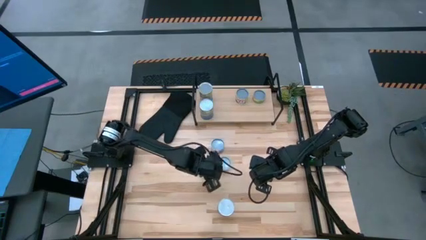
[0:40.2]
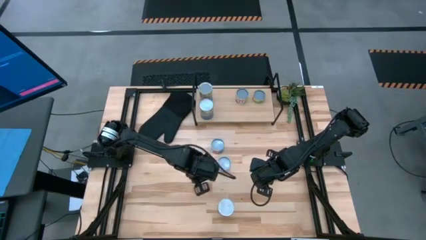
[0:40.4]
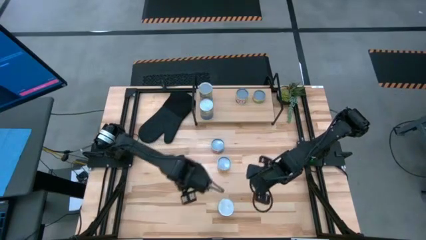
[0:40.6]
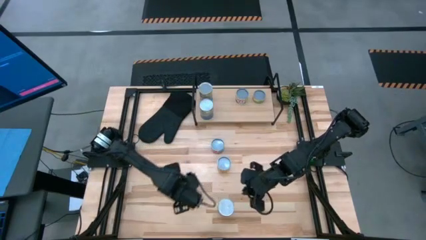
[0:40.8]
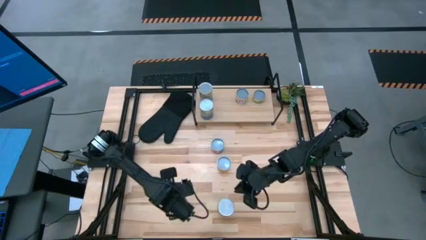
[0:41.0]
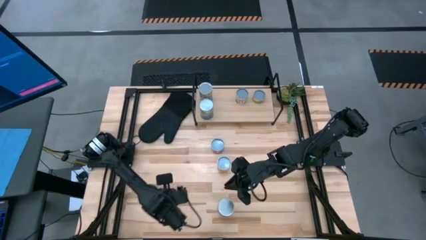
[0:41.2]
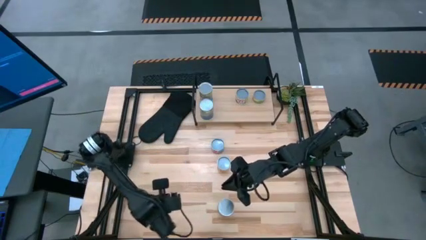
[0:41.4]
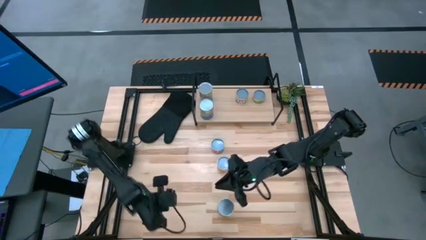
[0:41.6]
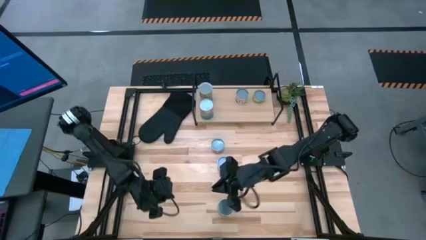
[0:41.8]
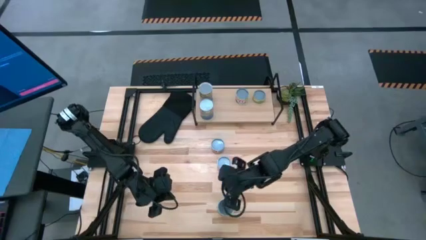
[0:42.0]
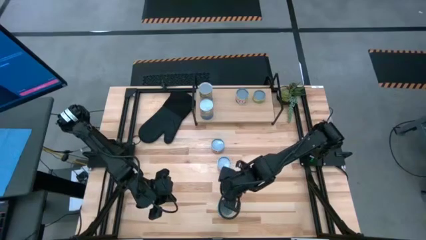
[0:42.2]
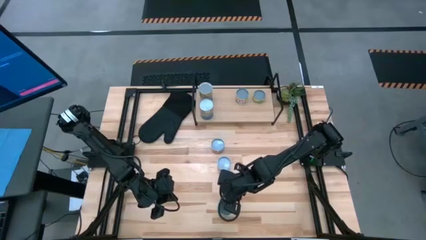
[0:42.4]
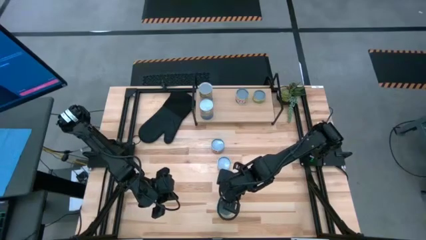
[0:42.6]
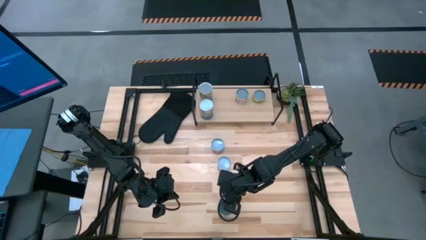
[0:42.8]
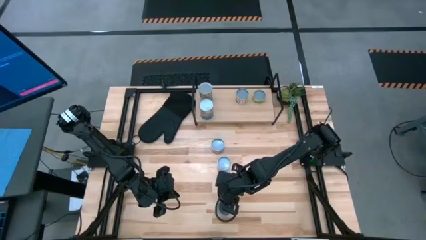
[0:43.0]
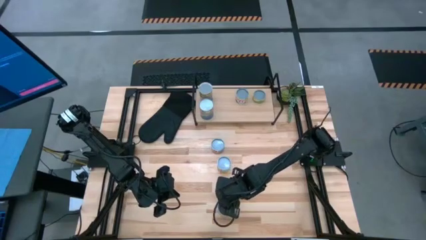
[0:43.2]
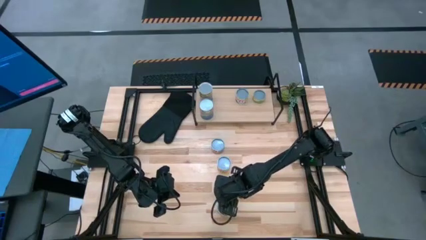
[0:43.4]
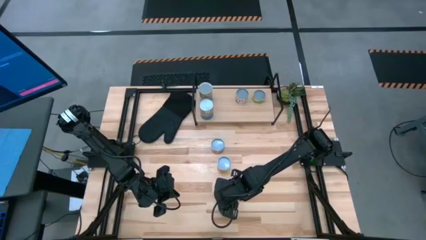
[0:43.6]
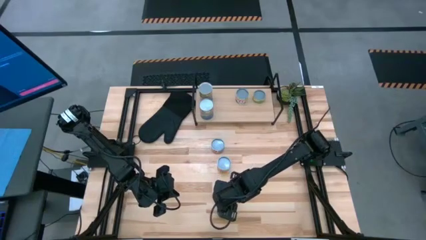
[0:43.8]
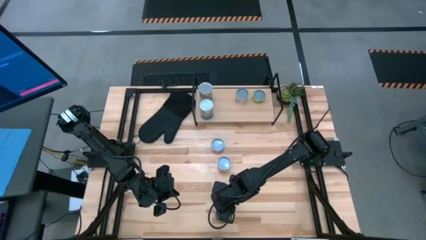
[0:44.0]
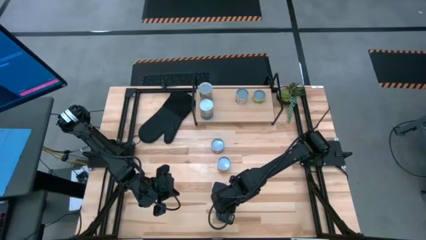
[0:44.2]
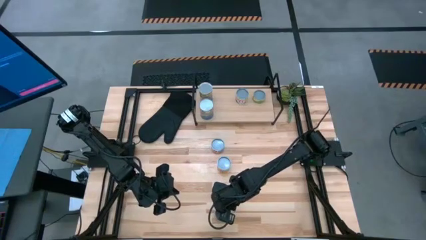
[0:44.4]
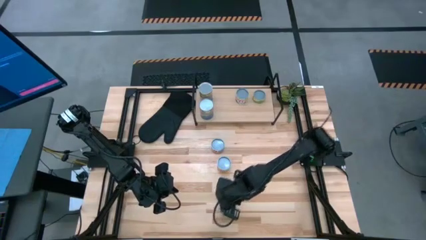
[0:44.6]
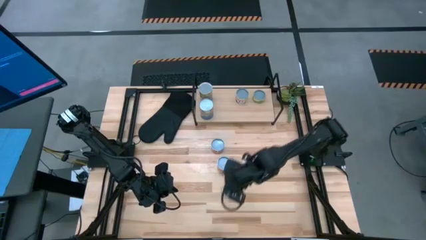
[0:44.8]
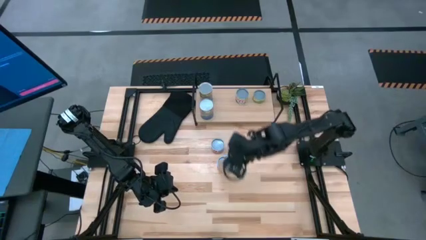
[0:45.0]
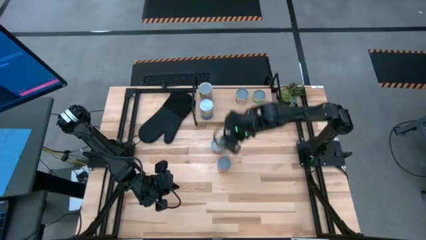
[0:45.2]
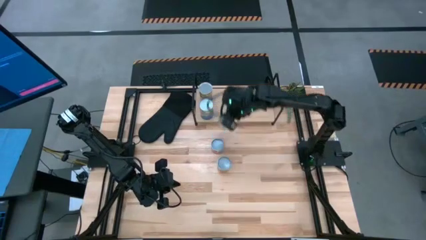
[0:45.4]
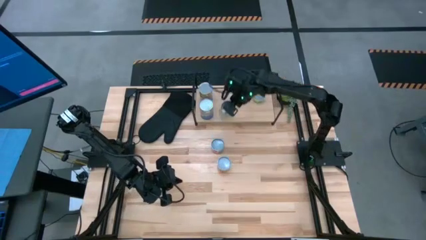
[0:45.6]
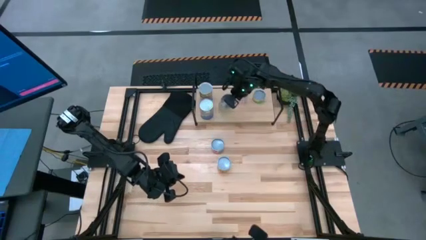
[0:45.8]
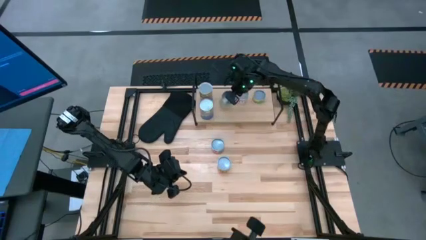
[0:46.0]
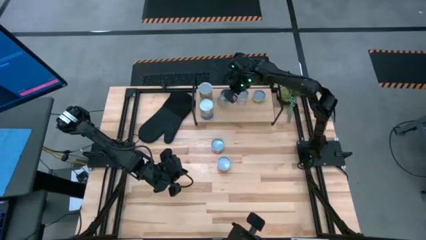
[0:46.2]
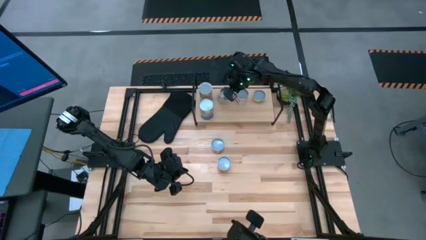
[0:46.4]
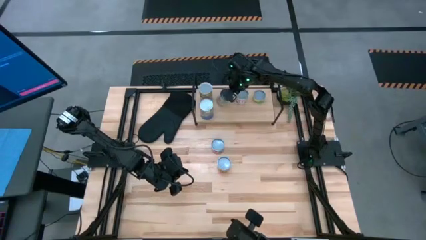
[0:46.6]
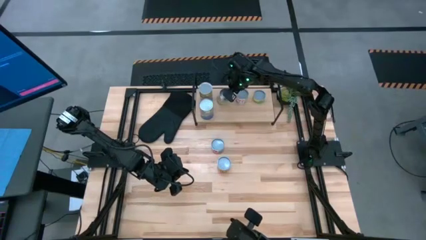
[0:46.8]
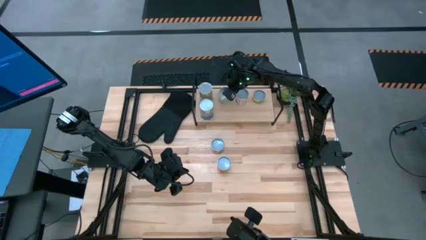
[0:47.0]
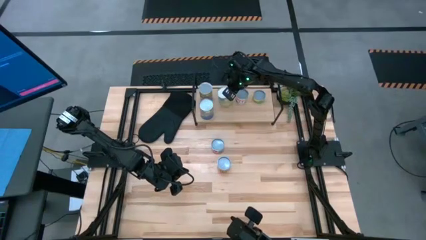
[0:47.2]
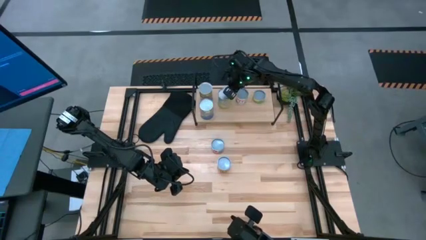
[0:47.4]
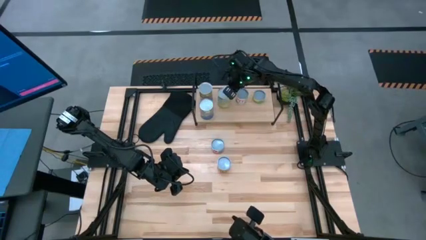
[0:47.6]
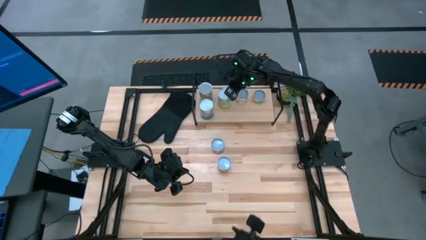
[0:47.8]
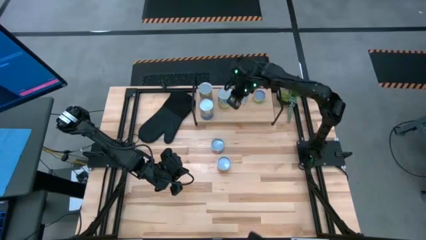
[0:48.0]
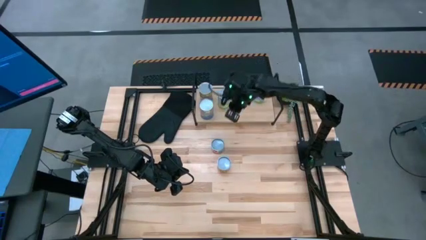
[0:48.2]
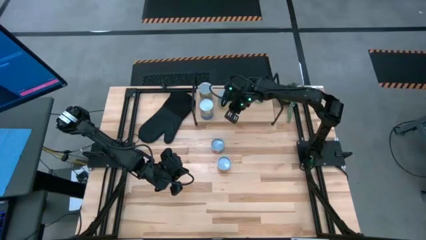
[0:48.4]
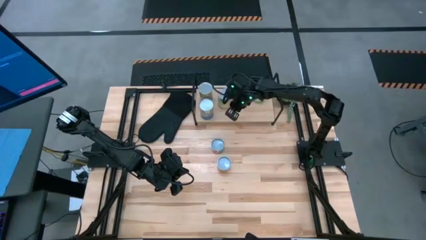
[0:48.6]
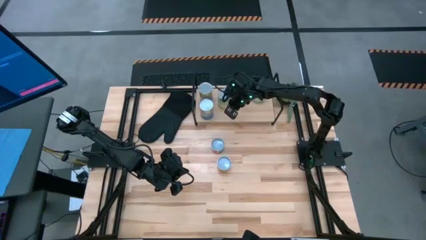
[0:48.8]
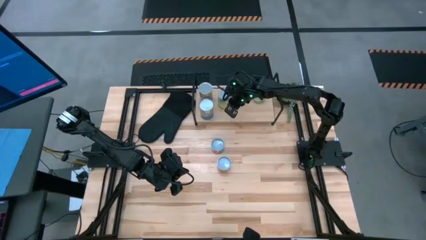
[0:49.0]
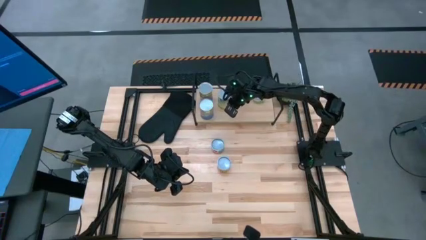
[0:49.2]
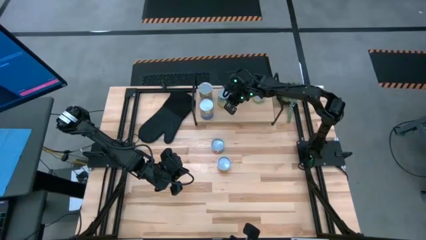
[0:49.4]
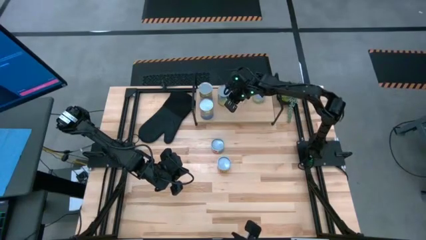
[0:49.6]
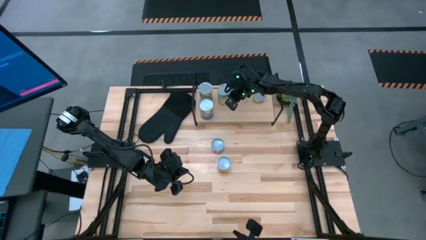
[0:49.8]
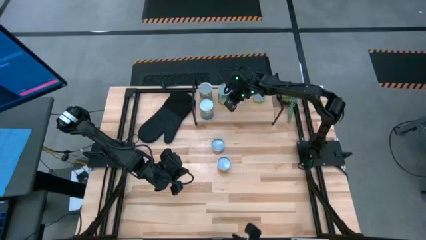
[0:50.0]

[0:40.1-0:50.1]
Task: Pick and place cans onto a shelf
Put the canned carrots on the shelf

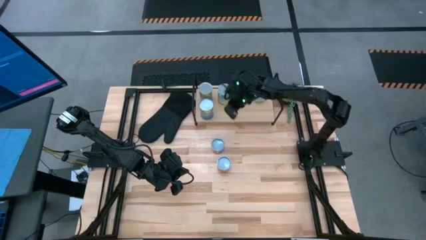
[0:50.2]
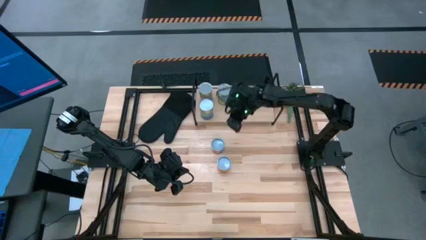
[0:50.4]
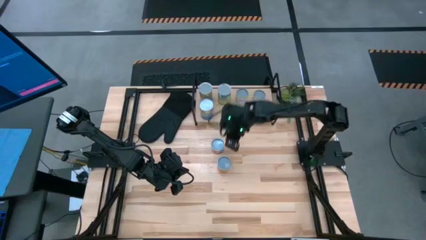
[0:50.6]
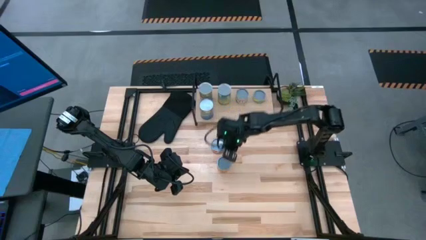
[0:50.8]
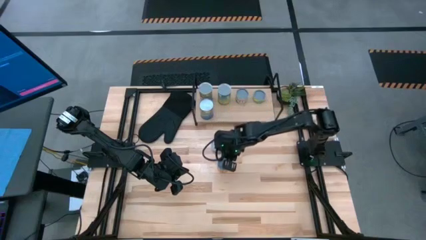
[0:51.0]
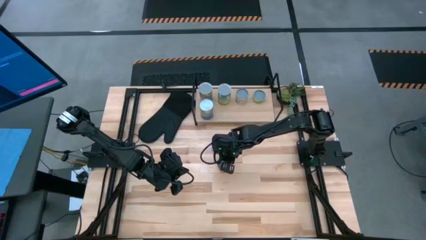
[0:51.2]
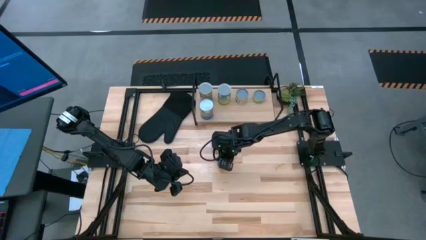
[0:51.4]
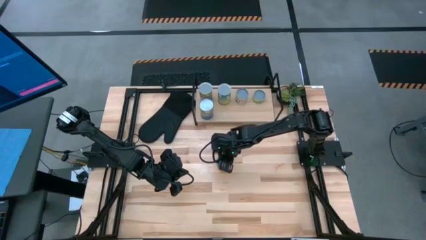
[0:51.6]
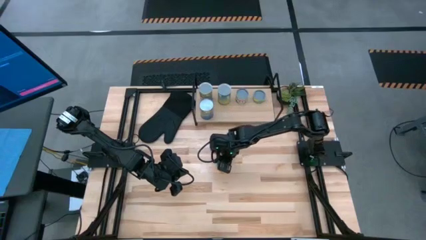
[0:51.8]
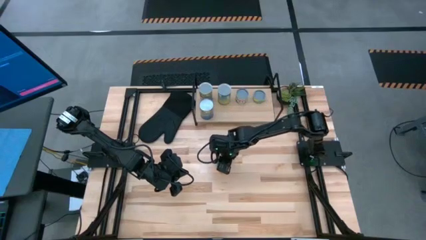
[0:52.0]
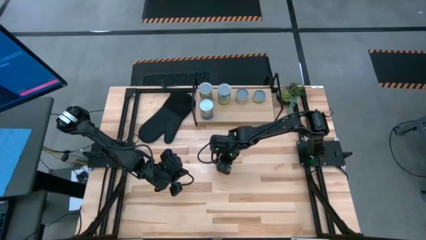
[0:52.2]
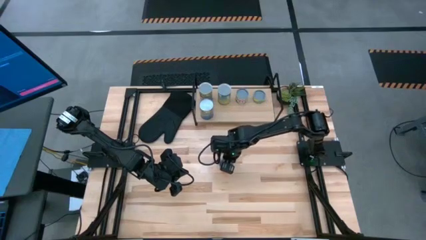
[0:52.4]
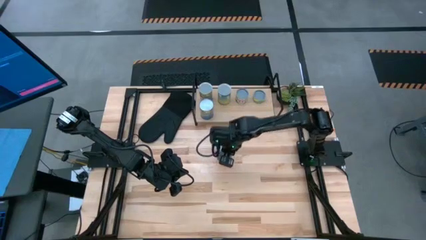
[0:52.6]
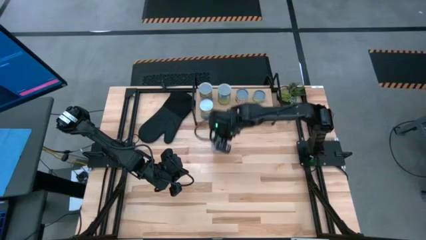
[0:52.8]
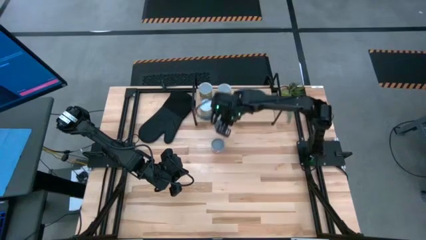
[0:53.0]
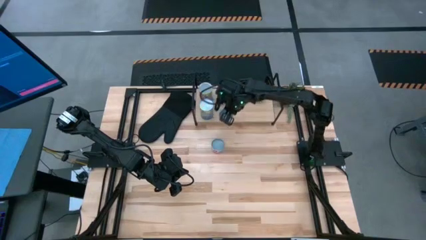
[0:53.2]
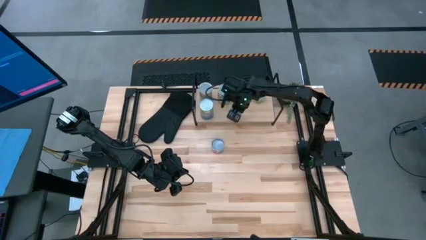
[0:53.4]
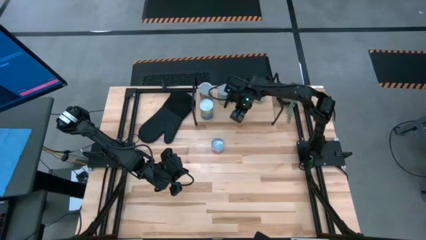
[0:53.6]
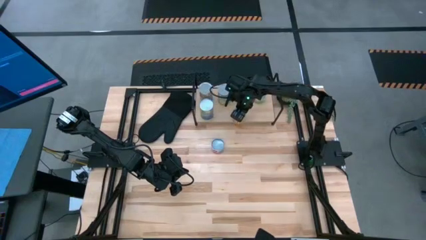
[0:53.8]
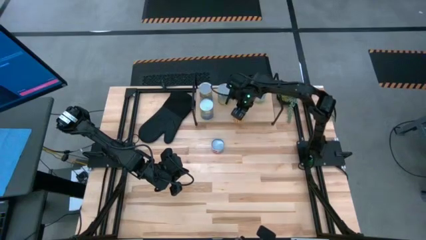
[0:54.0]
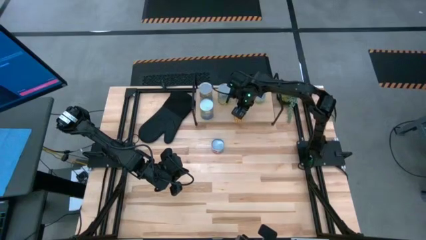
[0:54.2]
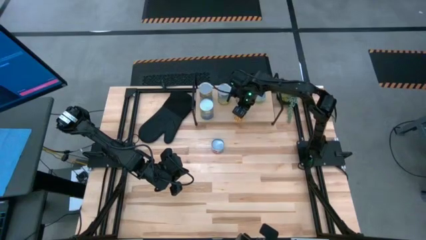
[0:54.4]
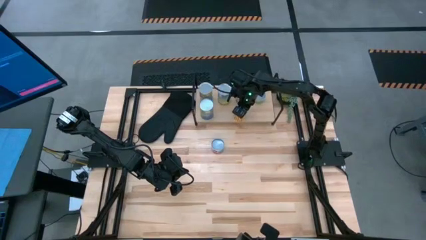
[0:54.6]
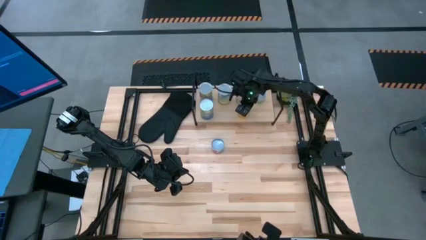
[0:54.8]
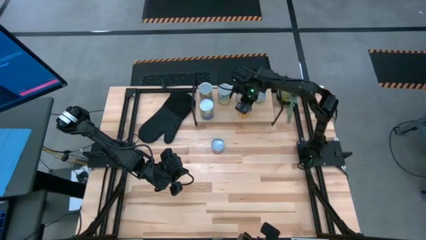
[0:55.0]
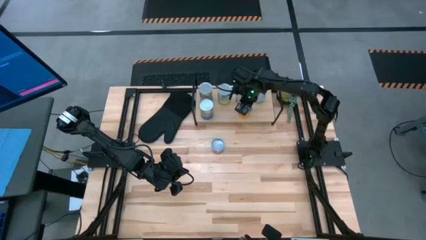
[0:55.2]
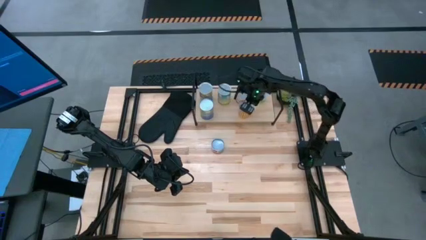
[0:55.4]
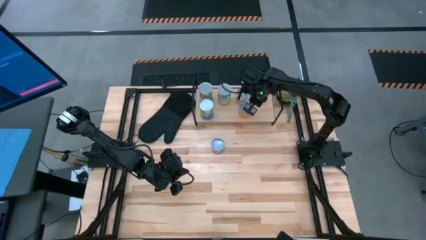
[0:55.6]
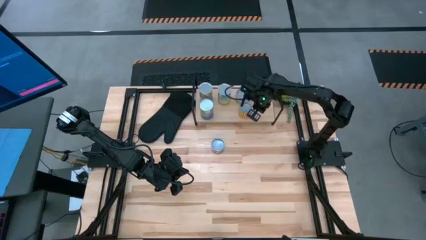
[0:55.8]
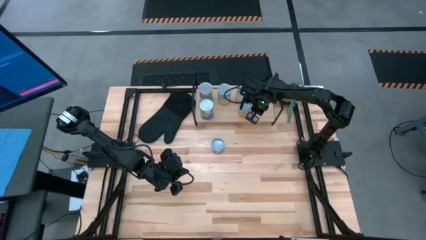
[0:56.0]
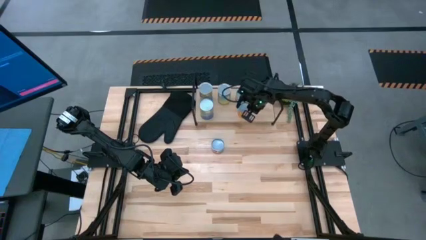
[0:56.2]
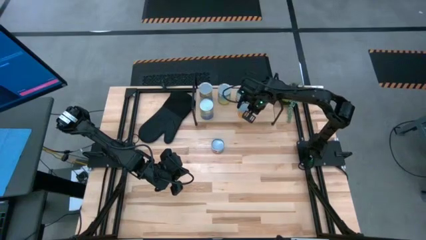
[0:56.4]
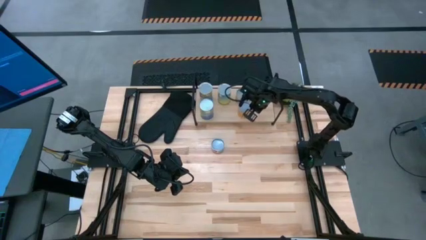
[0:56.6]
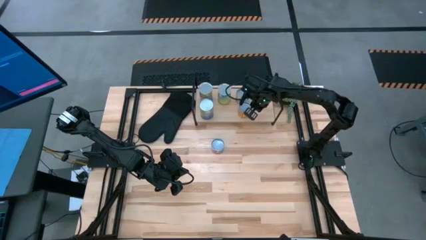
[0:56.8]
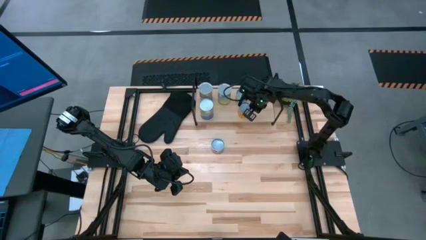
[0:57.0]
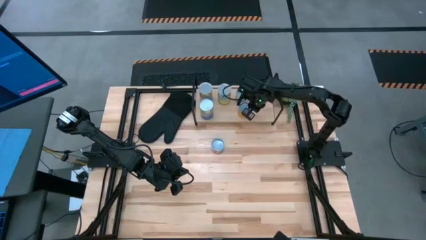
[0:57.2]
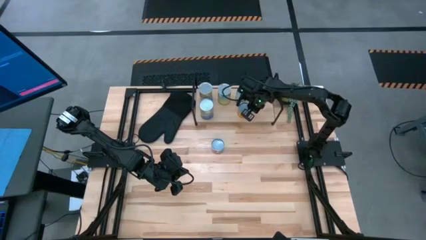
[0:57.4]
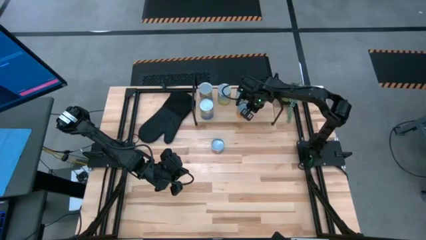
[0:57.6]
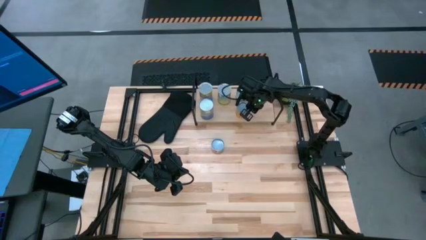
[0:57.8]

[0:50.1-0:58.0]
Put the spicy canned beans on the shelf
